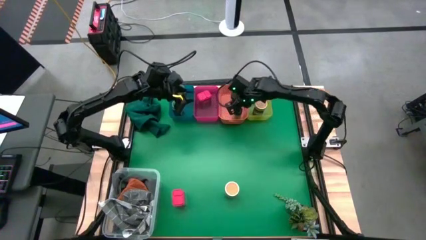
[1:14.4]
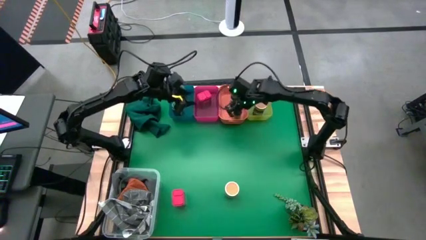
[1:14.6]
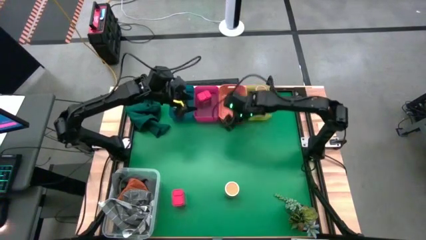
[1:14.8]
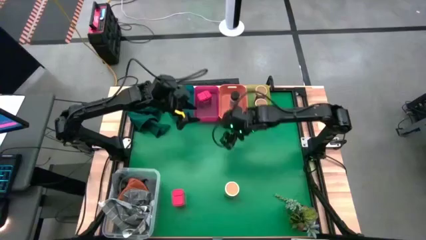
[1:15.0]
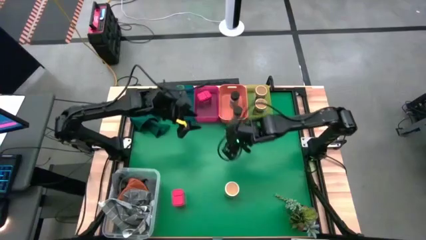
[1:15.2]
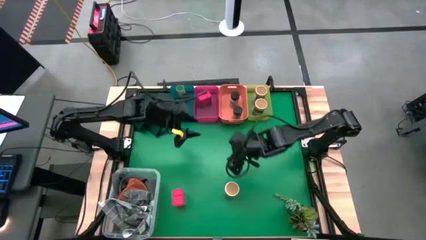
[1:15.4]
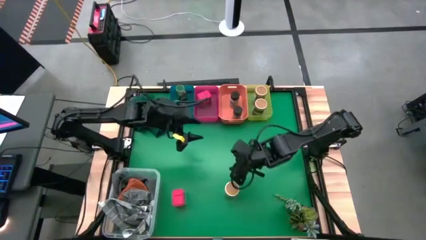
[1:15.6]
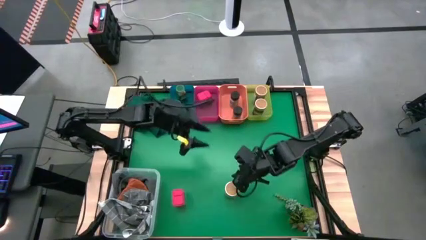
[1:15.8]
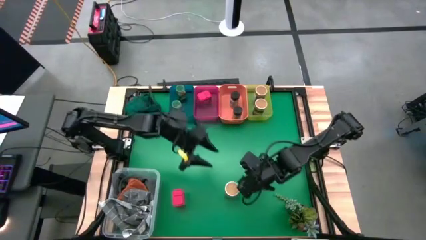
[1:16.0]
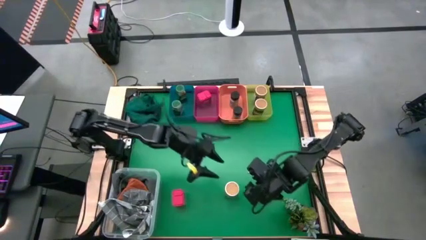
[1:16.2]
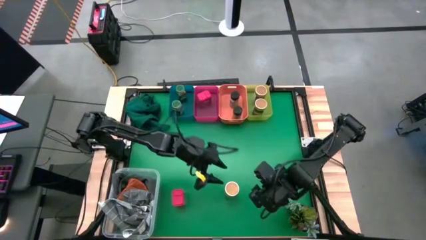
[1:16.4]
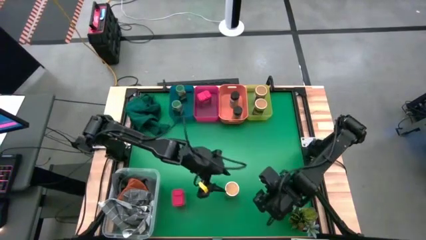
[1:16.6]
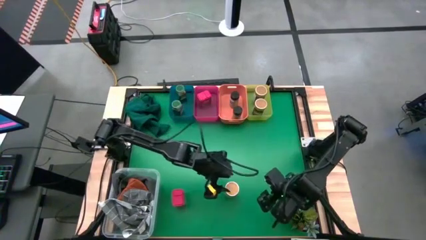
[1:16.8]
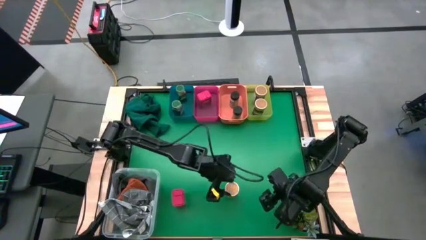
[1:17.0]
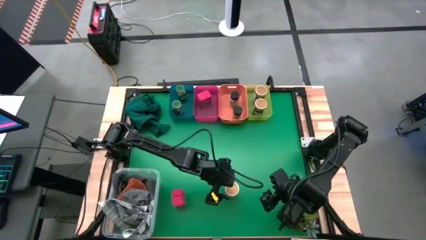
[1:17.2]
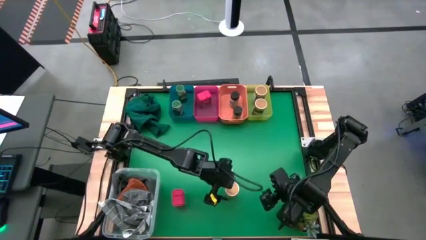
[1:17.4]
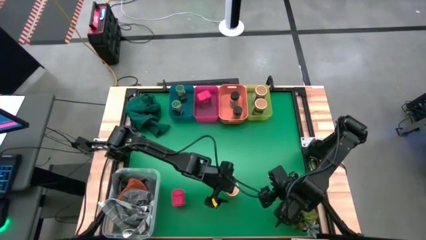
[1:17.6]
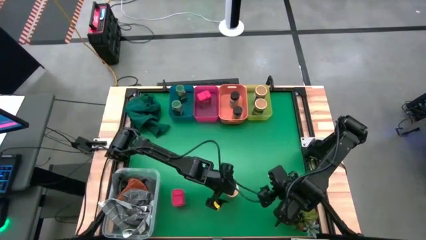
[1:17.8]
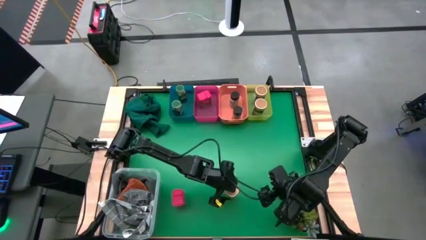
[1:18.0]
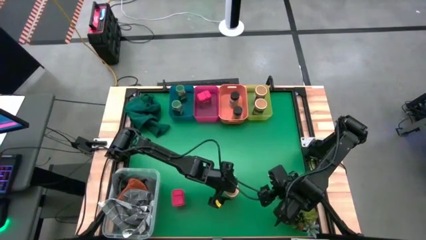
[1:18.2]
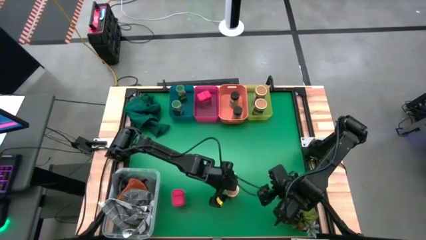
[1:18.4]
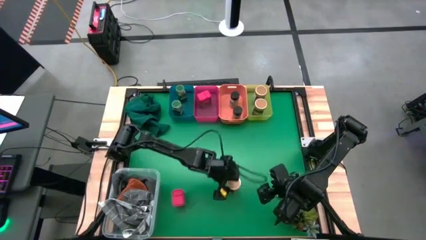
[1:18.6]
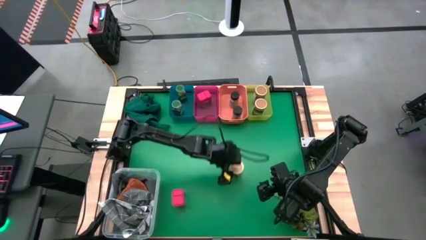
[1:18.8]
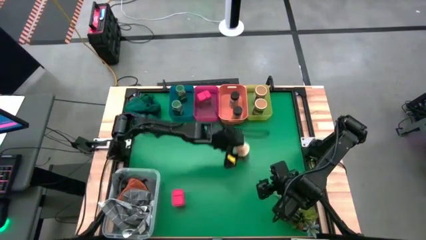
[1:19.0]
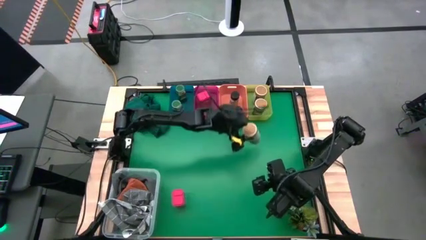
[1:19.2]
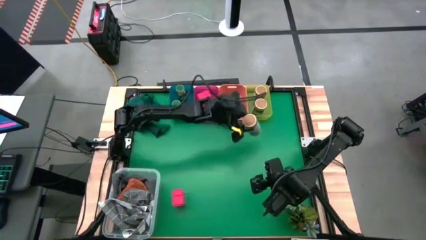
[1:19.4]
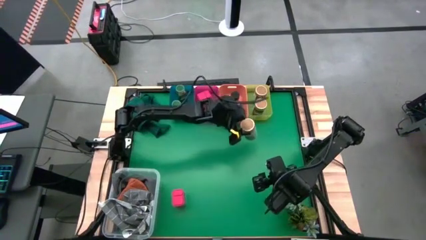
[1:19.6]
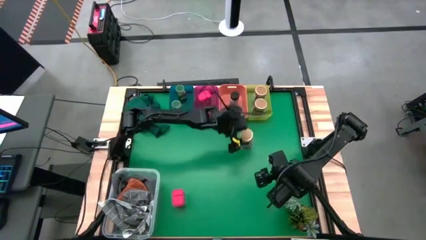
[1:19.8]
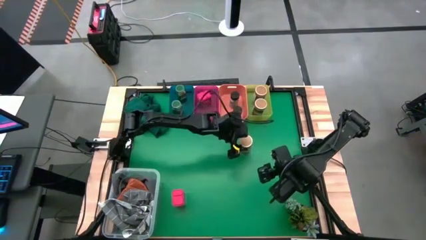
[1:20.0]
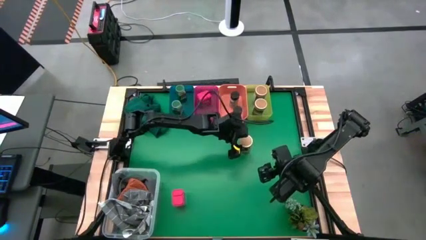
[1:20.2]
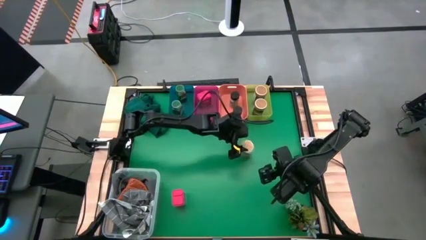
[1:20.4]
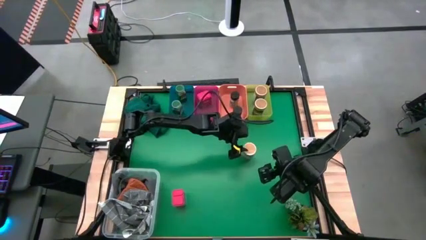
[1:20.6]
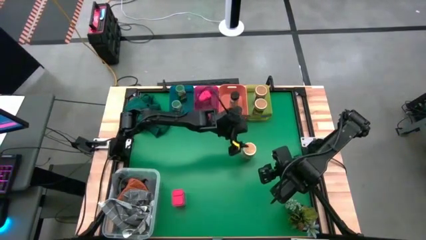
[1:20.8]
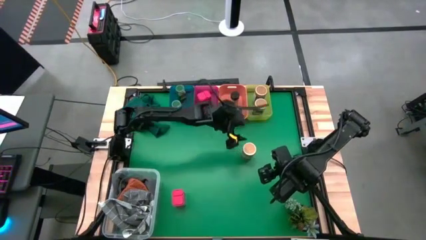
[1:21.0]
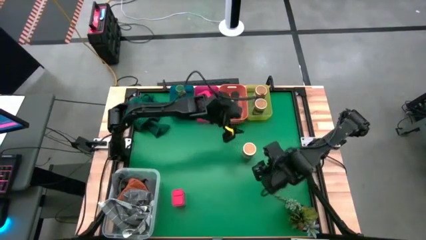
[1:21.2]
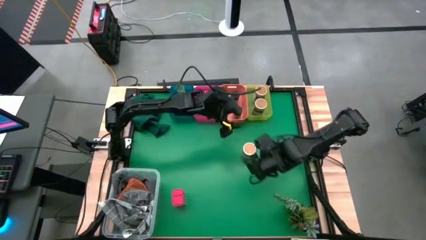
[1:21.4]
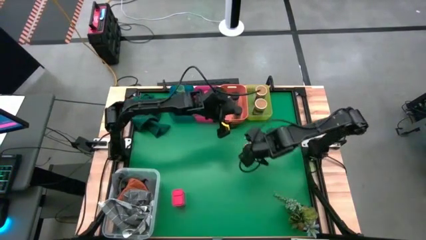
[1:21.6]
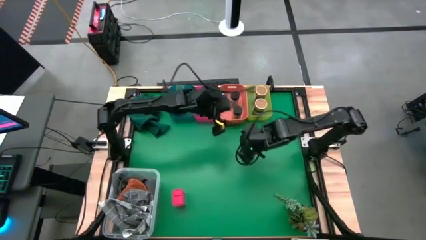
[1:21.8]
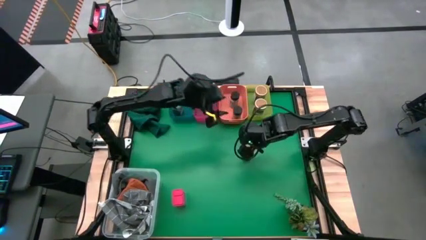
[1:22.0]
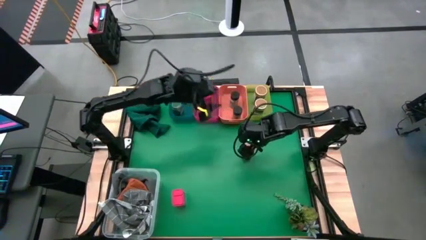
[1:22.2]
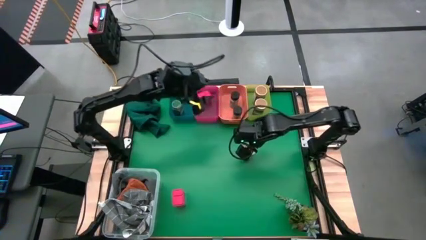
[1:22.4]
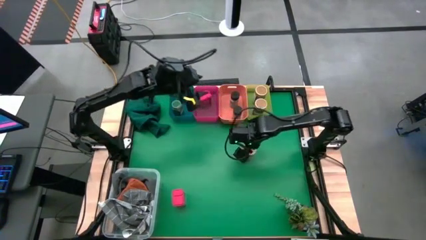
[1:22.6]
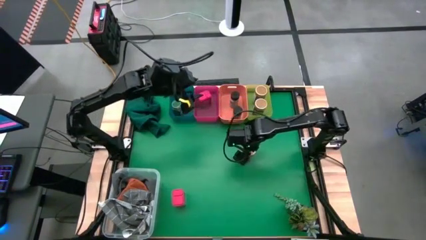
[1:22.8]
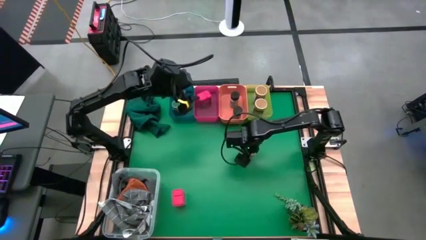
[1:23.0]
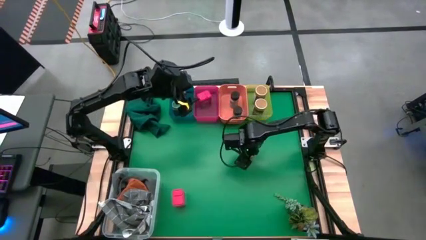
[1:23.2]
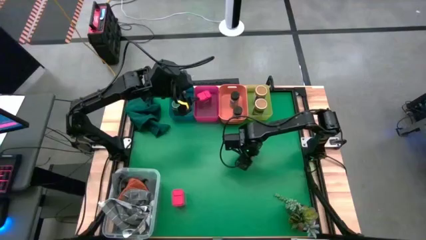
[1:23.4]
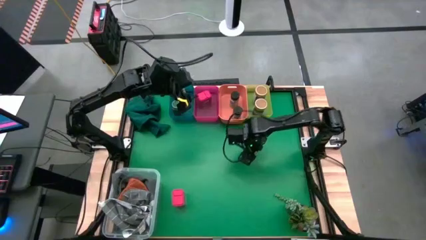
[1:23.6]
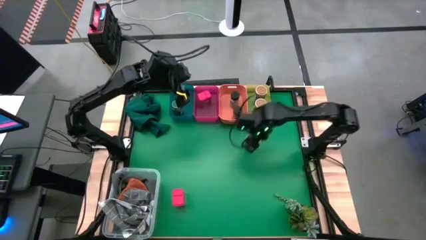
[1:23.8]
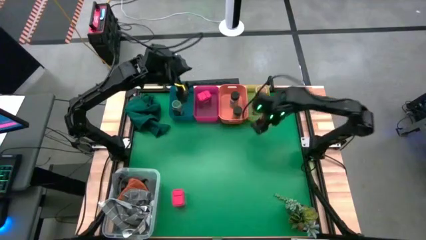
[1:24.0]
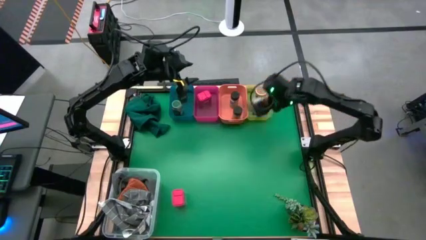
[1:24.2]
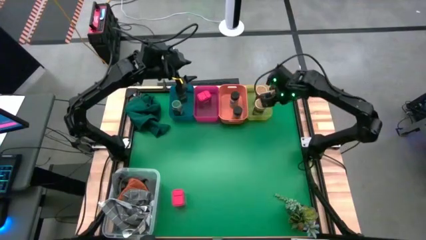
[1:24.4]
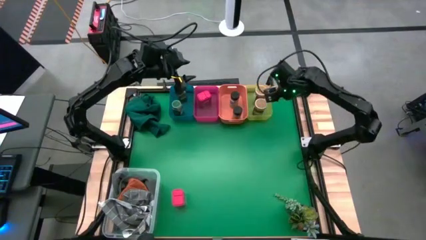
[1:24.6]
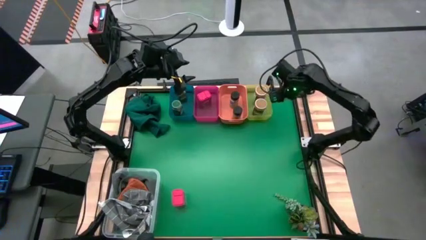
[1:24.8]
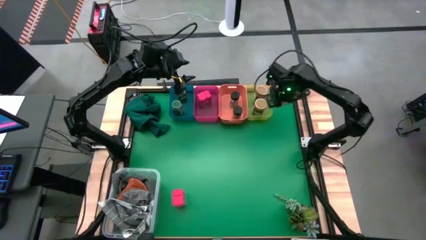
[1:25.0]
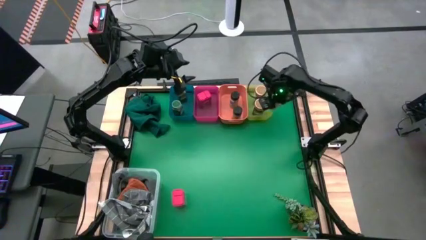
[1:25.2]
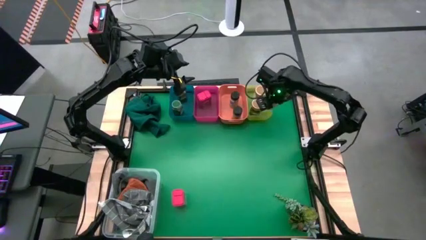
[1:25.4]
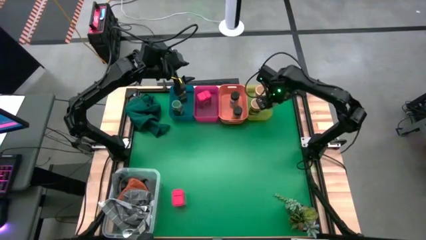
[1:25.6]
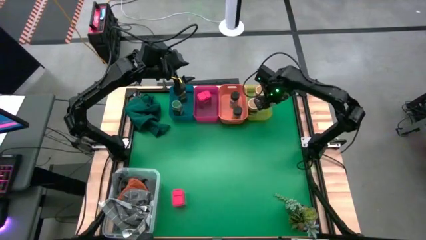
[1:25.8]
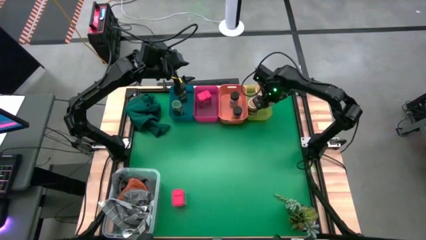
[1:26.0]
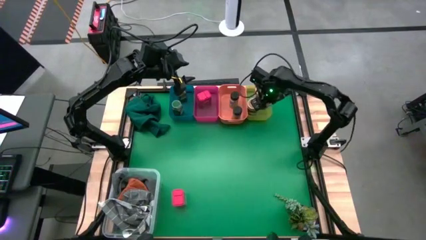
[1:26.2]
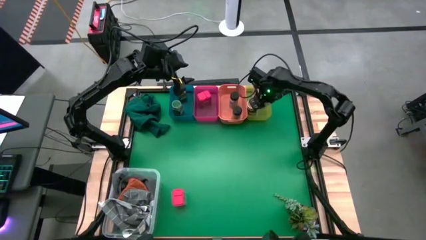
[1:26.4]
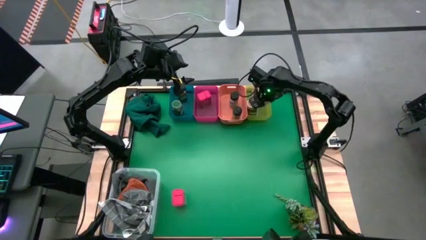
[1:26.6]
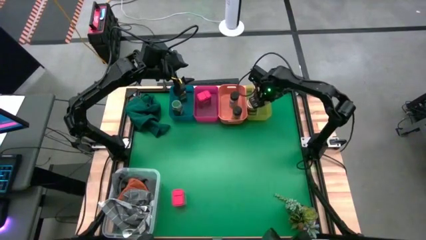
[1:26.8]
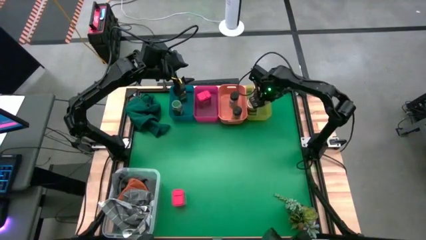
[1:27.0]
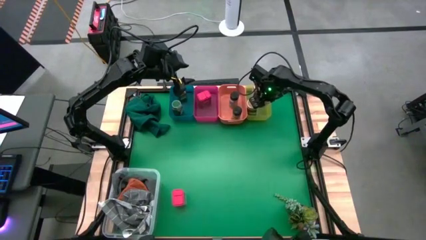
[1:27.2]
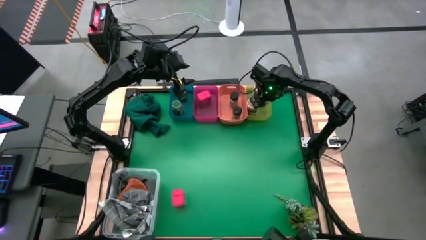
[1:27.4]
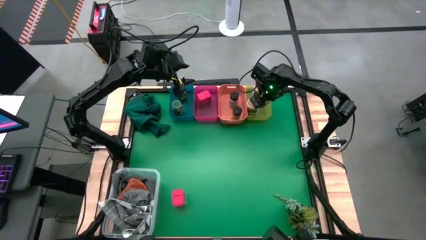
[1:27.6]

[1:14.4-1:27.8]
Task: Sort spices by type
Put the gold spice bottle into the yellow bin

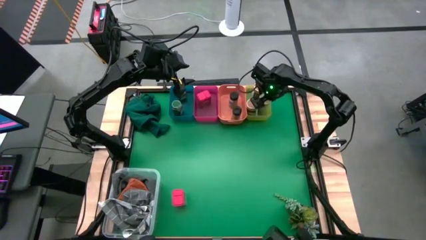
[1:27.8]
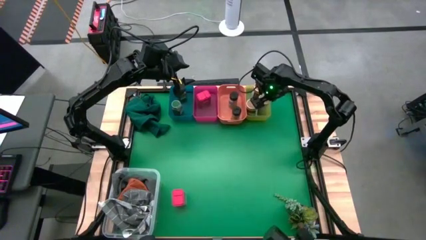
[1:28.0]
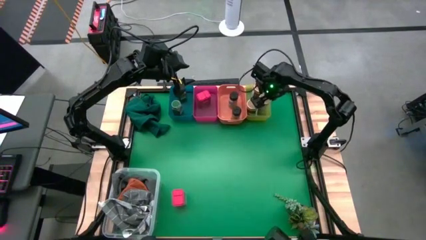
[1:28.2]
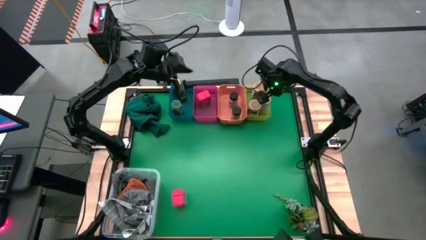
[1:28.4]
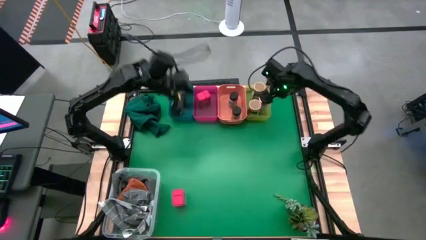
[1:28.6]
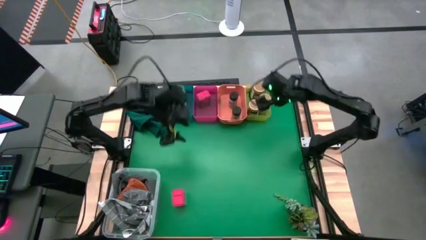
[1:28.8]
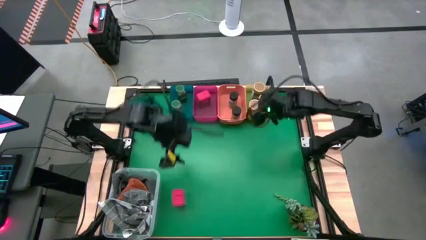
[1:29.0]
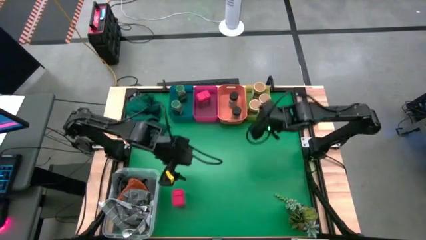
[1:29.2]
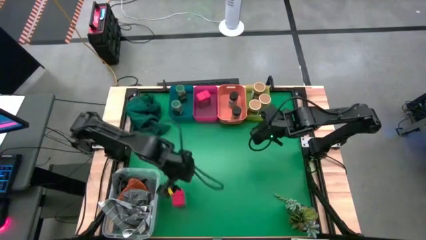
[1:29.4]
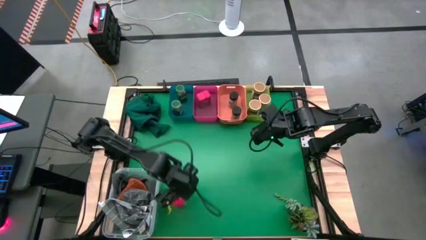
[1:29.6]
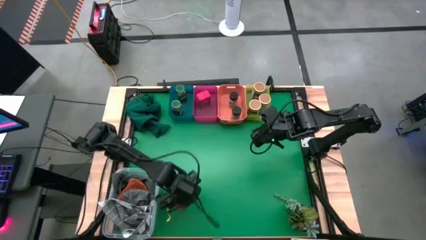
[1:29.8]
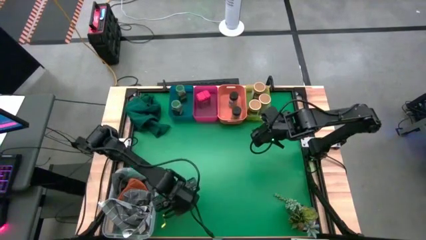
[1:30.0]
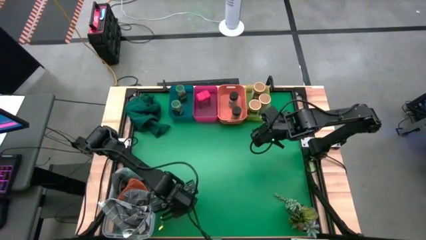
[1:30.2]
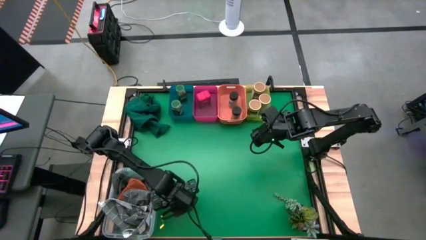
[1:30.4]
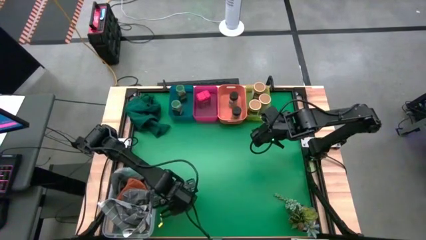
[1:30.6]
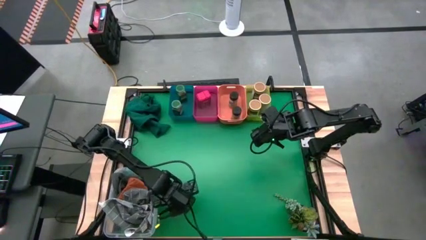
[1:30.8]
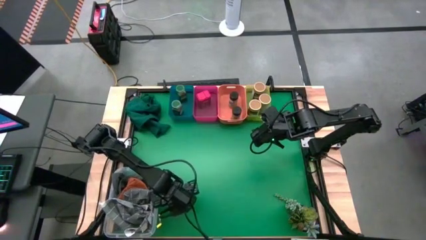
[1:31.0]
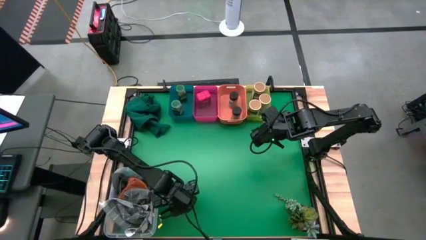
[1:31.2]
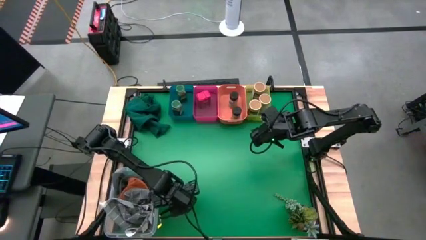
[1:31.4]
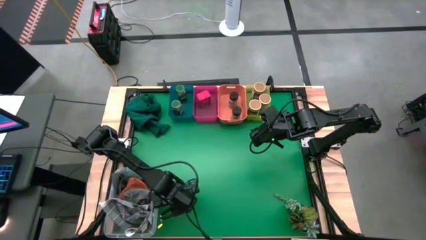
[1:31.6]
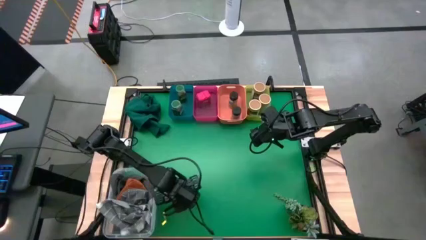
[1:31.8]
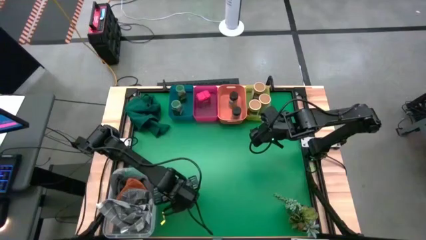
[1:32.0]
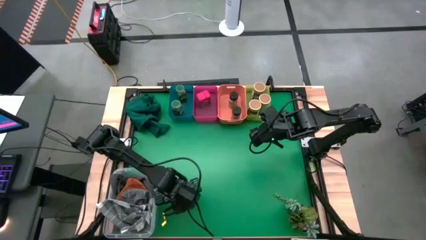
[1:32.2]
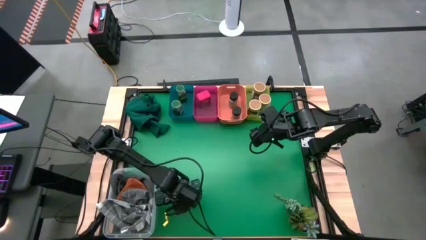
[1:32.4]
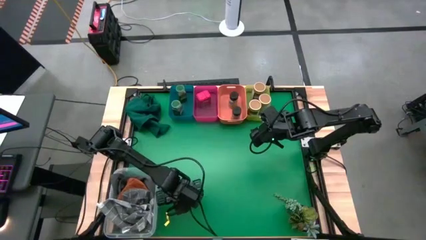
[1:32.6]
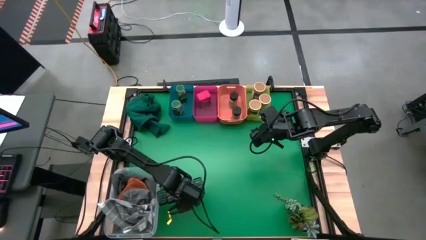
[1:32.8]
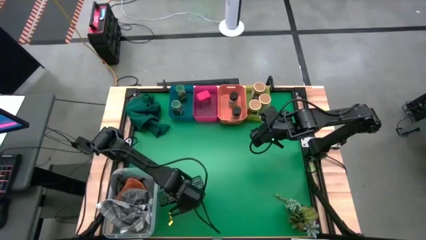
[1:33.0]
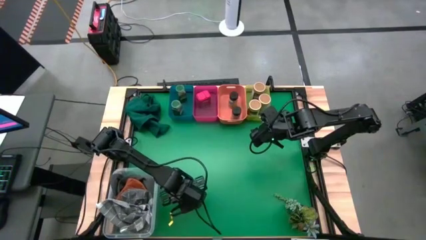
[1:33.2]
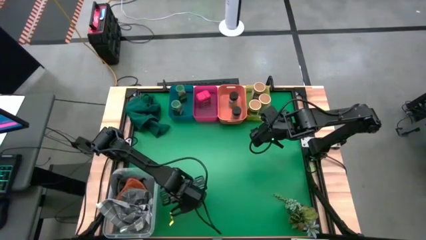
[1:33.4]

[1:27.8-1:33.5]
Put the red spice can into the pink bin
